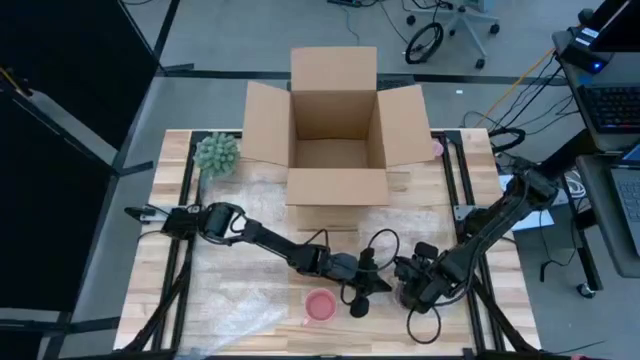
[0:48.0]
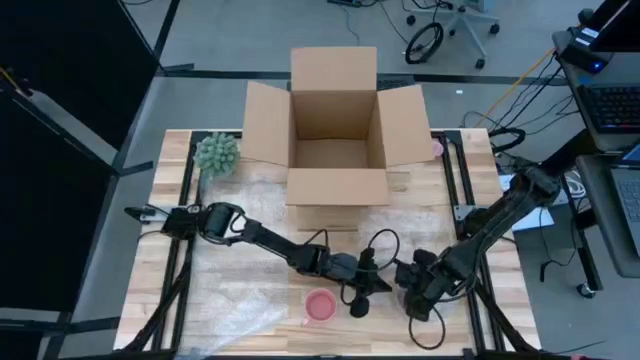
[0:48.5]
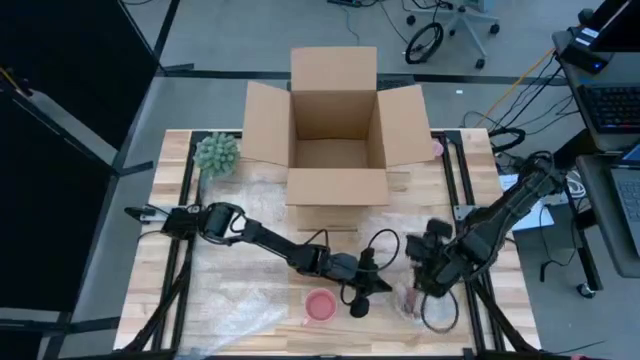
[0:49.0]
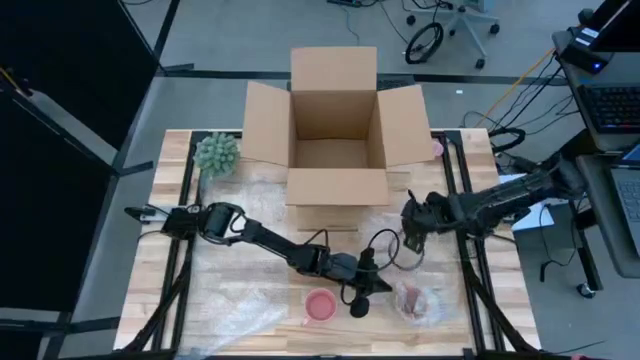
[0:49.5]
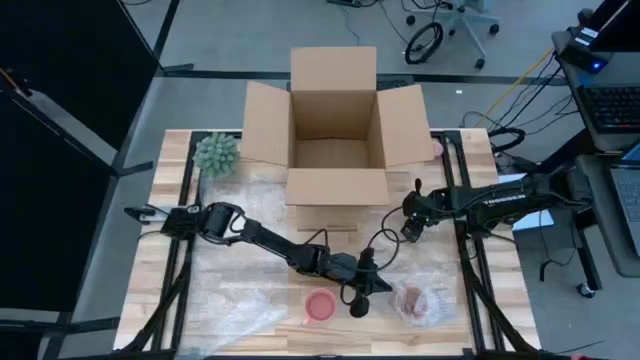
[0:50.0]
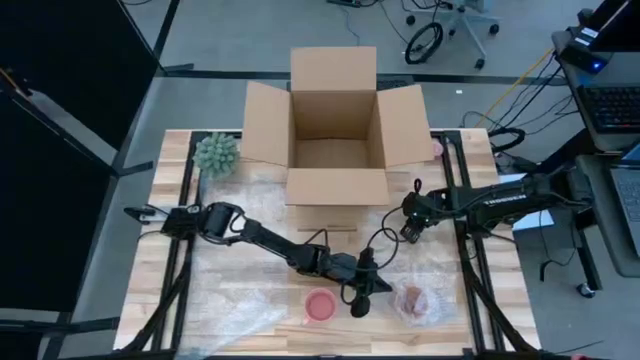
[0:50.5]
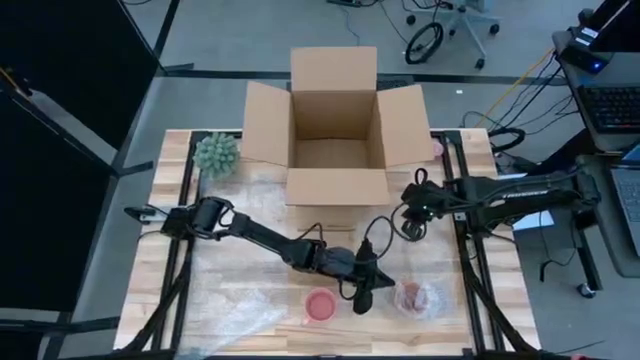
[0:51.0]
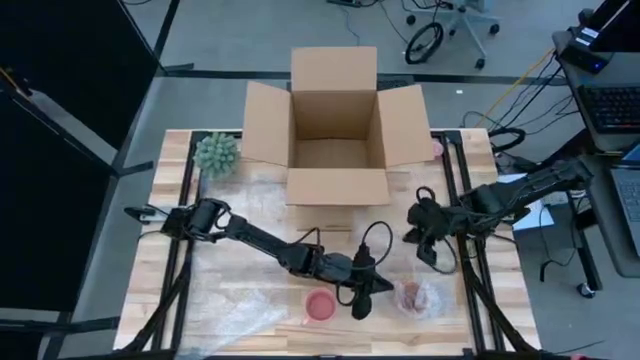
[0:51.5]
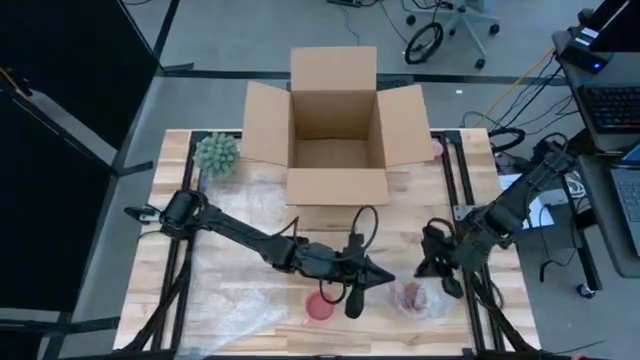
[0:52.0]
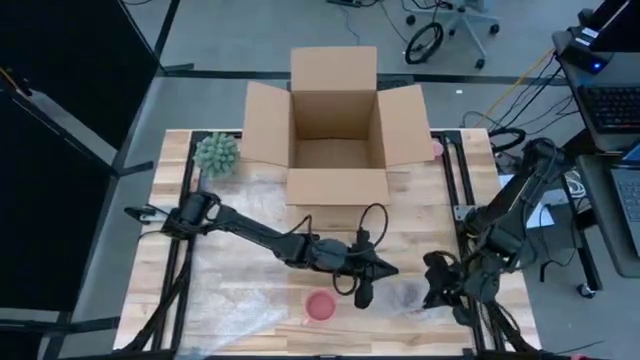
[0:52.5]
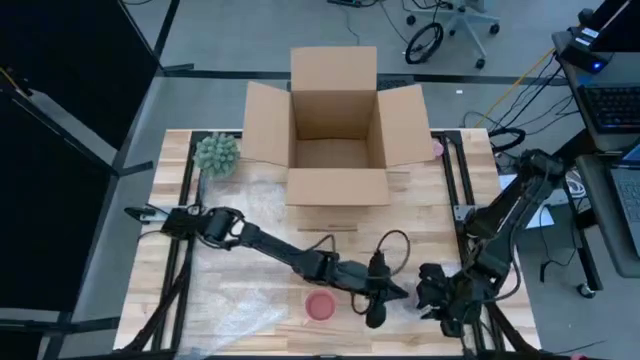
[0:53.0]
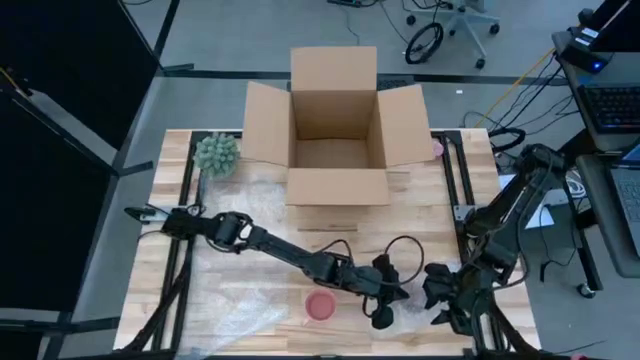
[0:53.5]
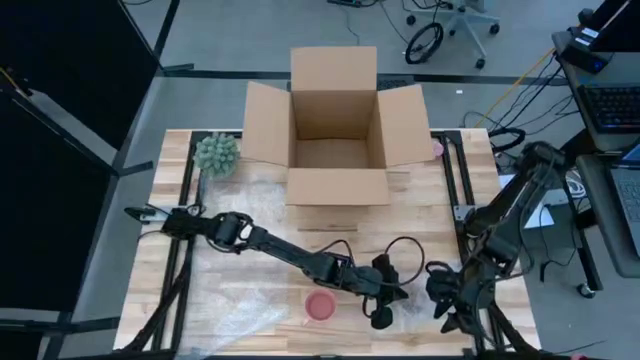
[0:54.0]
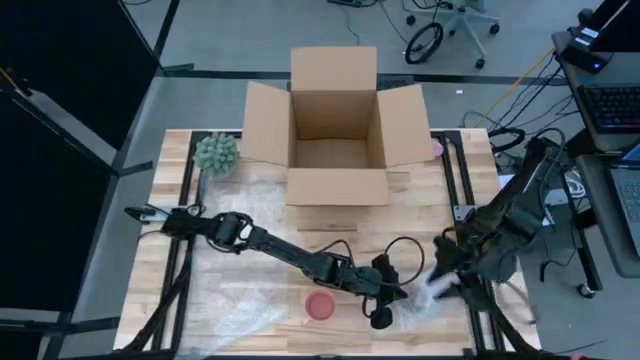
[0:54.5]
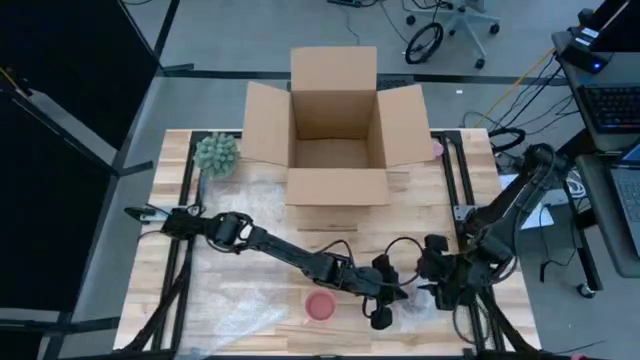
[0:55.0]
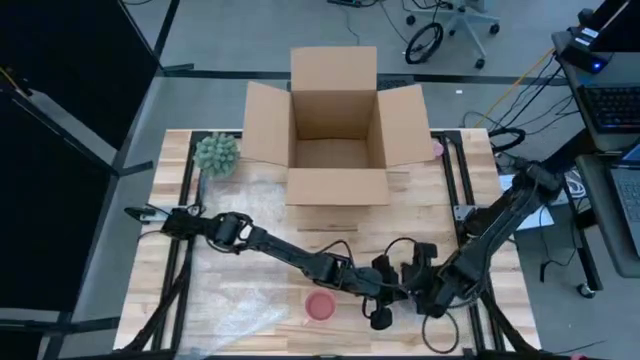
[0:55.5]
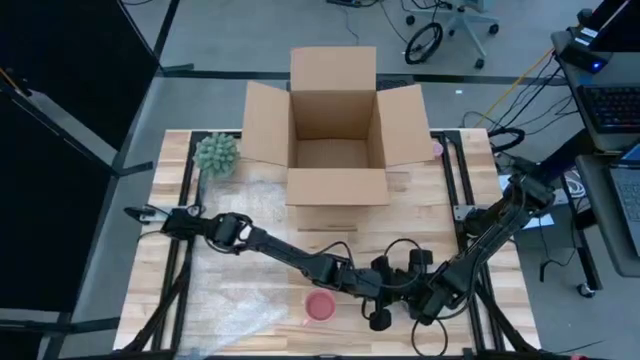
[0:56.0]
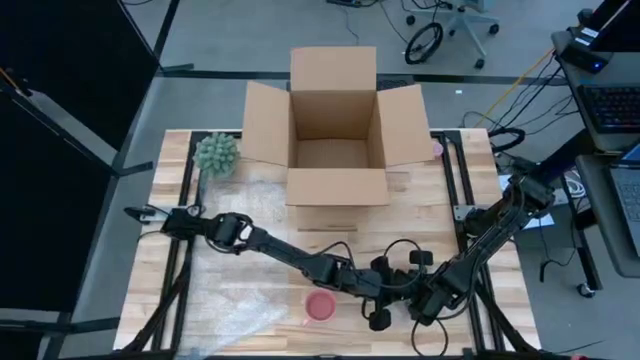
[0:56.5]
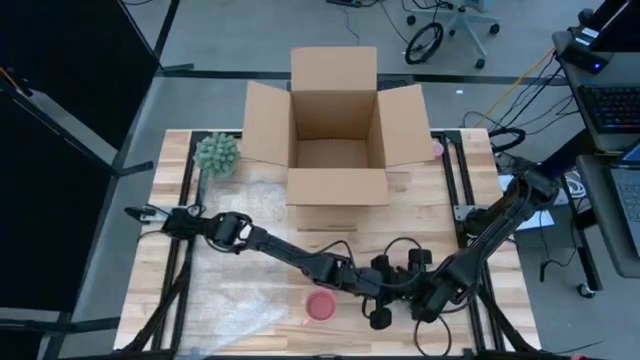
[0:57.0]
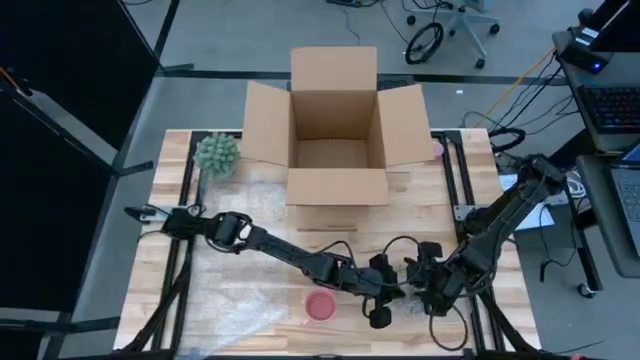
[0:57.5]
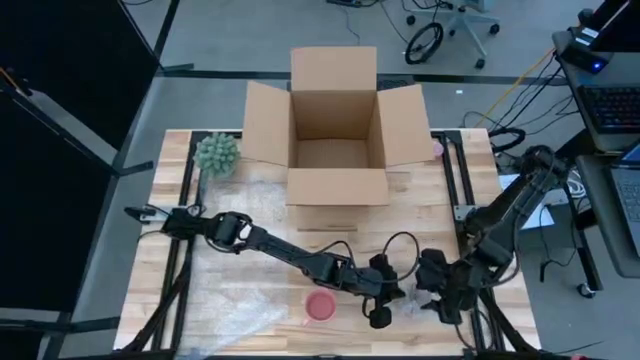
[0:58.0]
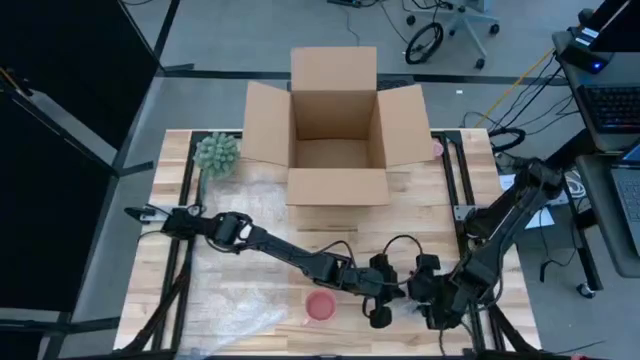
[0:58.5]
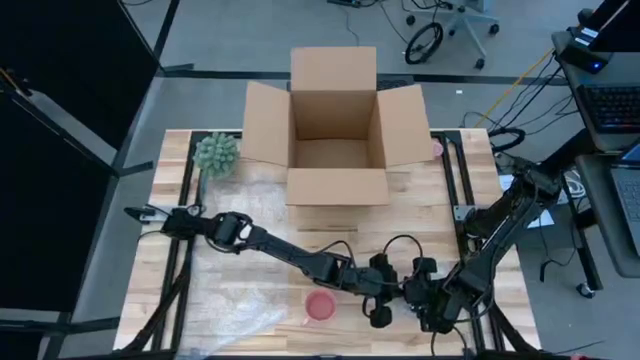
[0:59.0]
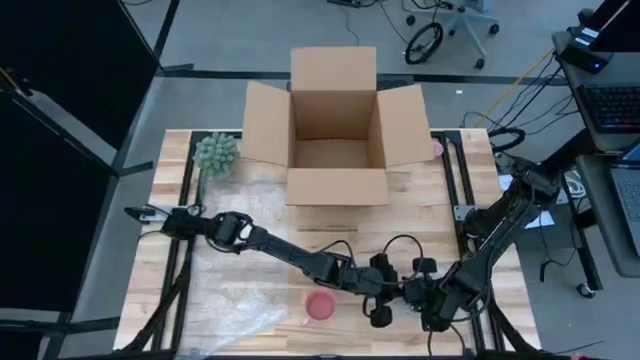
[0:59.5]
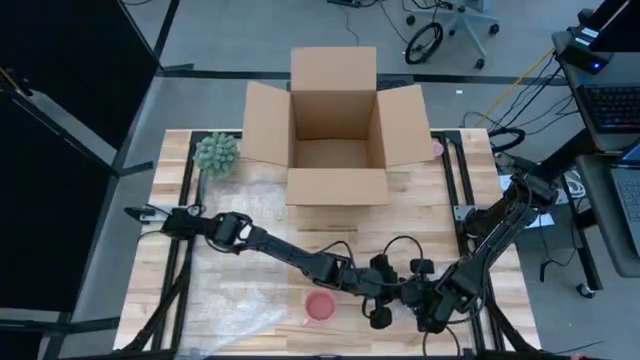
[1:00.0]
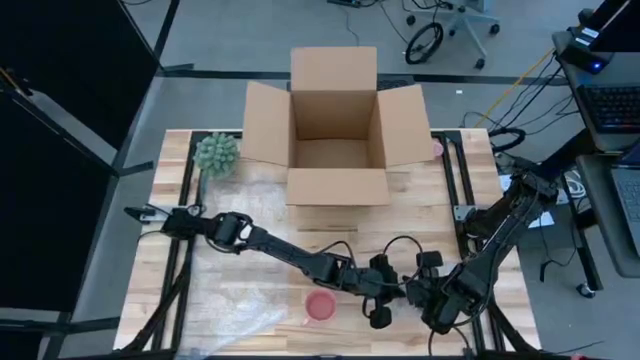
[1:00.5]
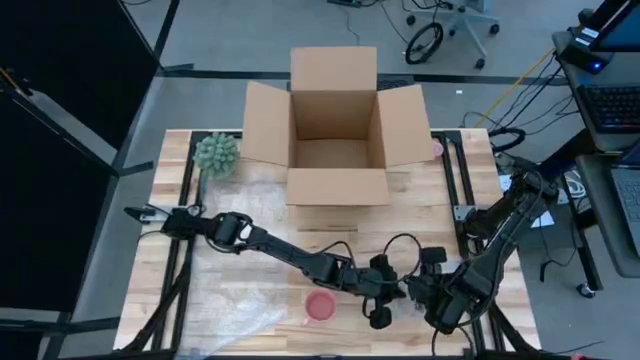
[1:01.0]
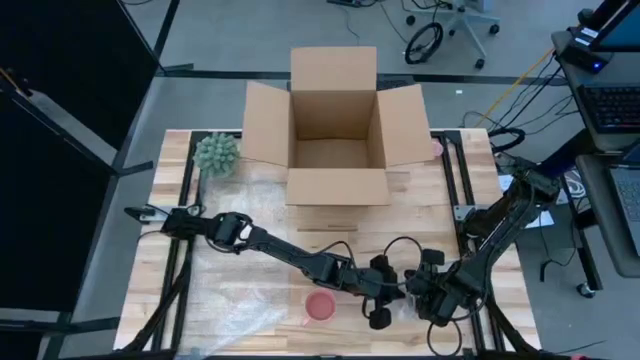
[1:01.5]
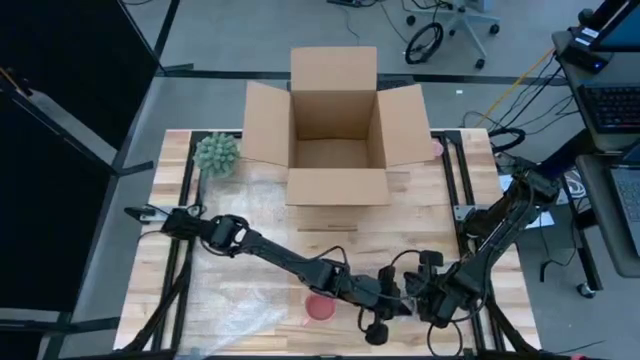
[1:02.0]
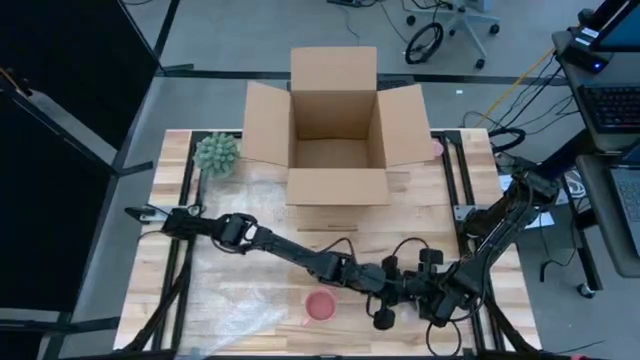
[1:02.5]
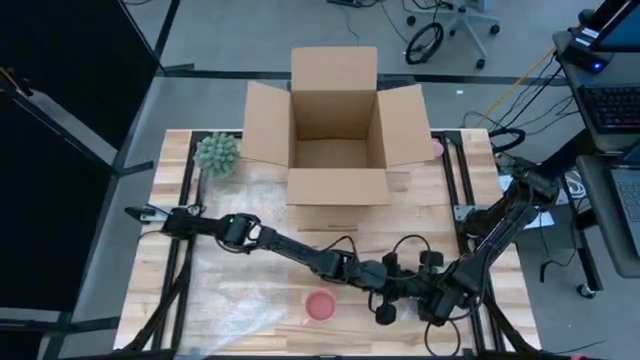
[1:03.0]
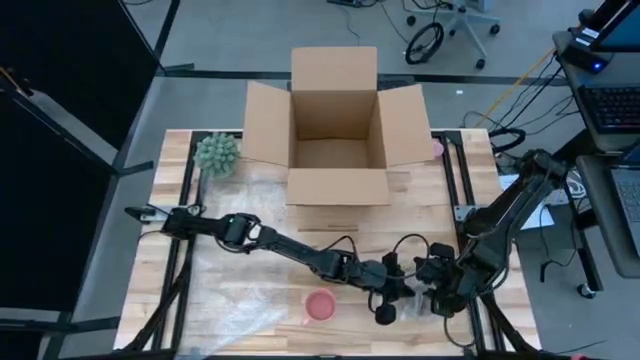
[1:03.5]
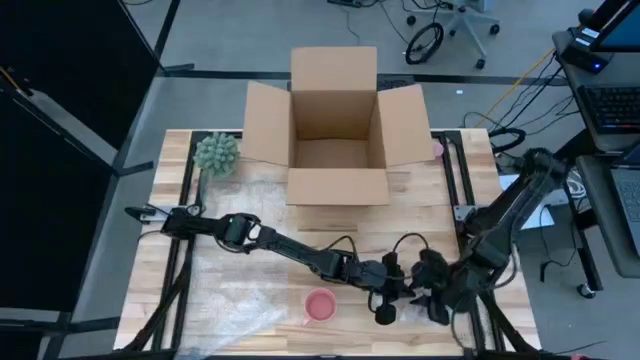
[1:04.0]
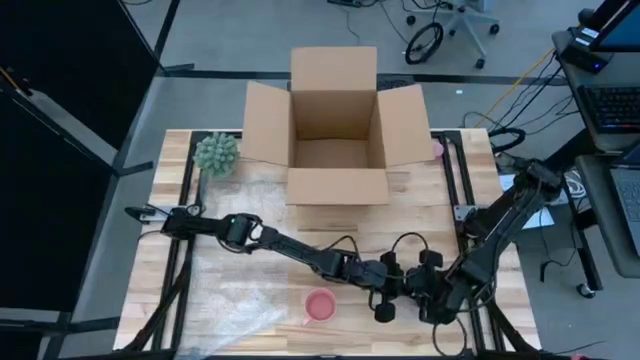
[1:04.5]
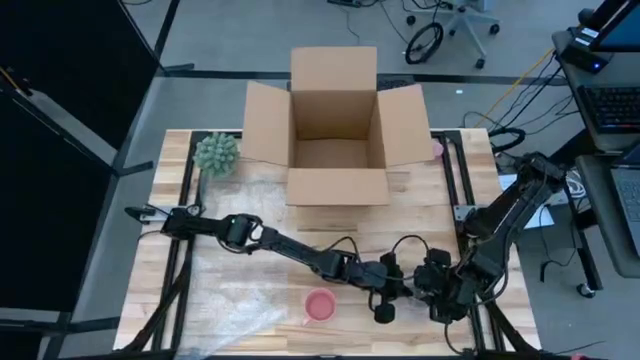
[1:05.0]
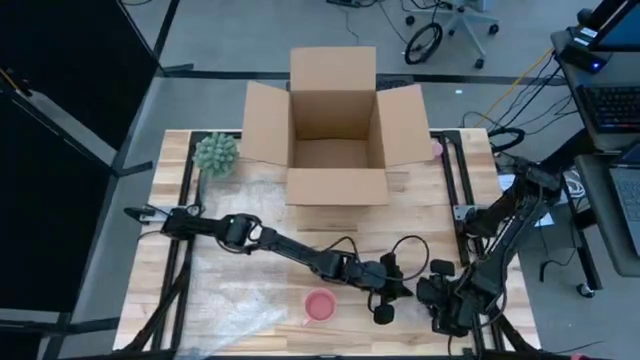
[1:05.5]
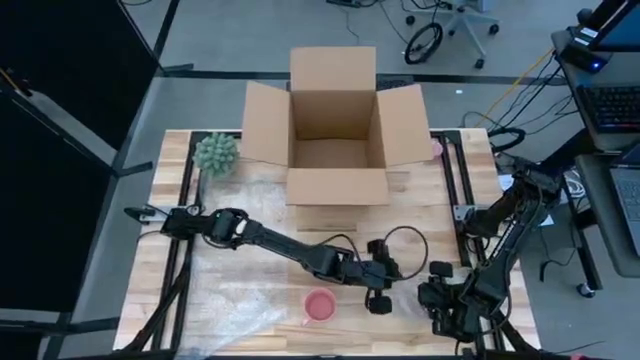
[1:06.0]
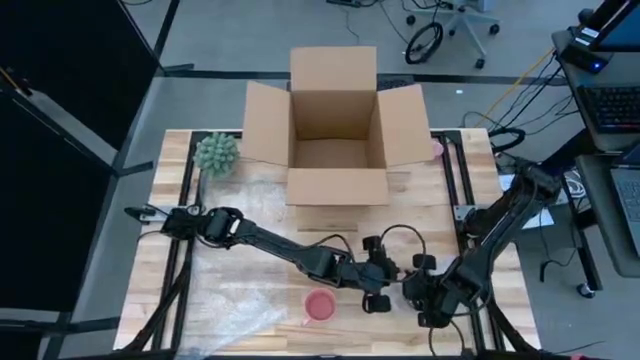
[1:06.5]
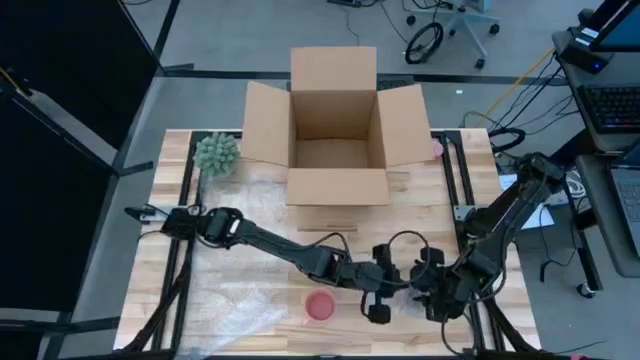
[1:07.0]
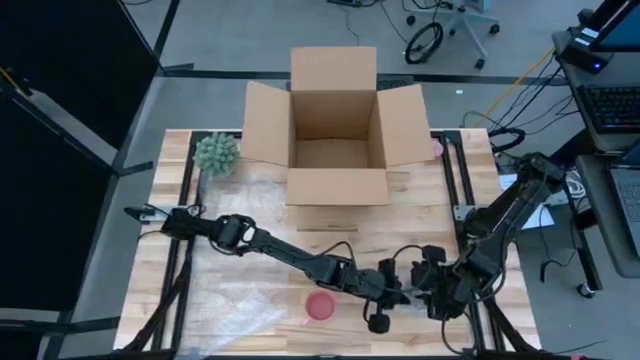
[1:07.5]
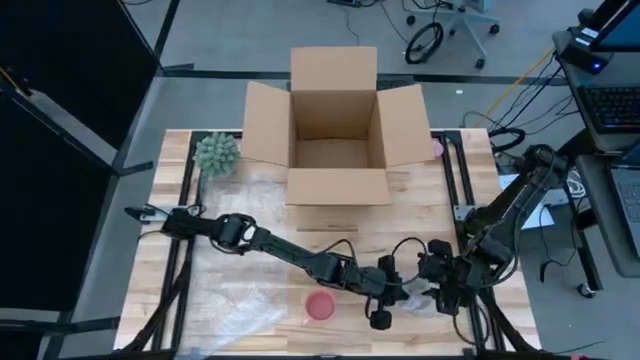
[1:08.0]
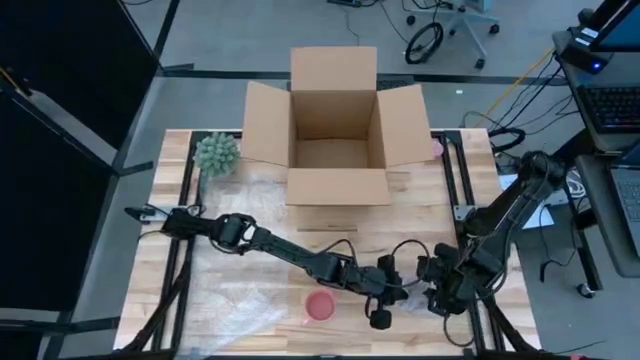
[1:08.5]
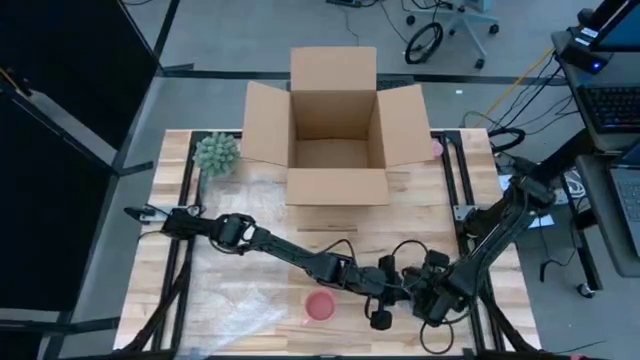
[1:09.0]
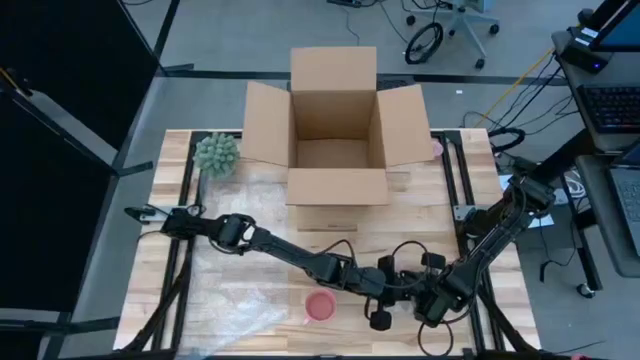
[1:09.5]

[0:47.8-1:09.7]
Task: wrap mug
Wrap the yellow mug with bubble wrap
